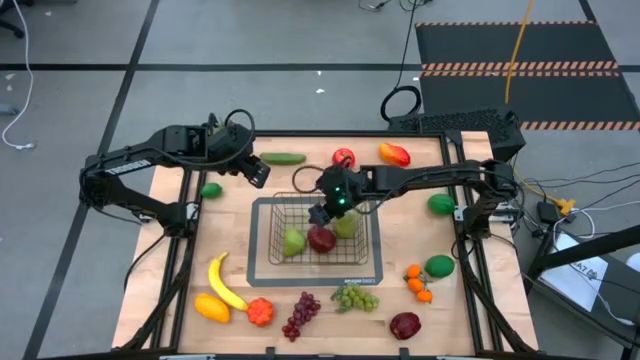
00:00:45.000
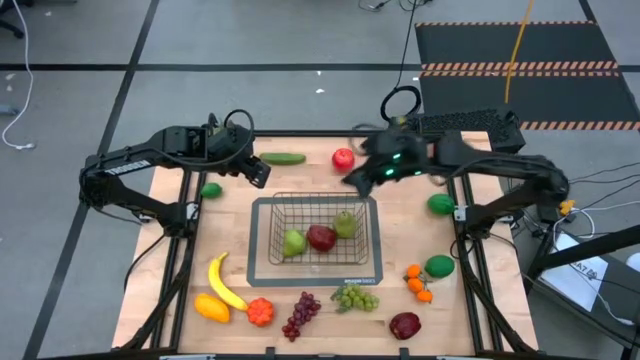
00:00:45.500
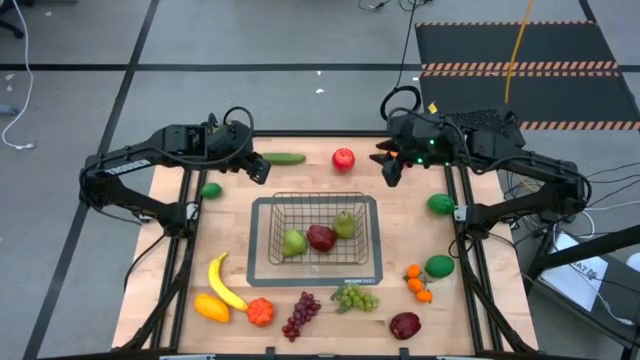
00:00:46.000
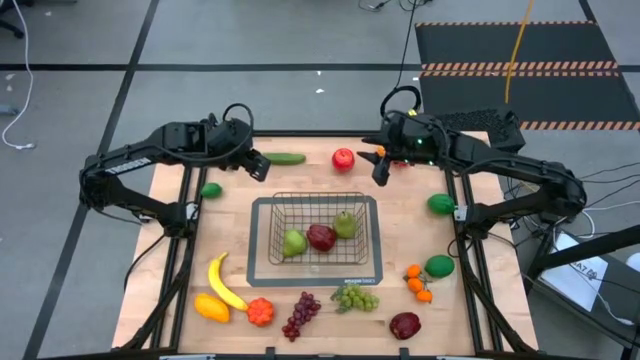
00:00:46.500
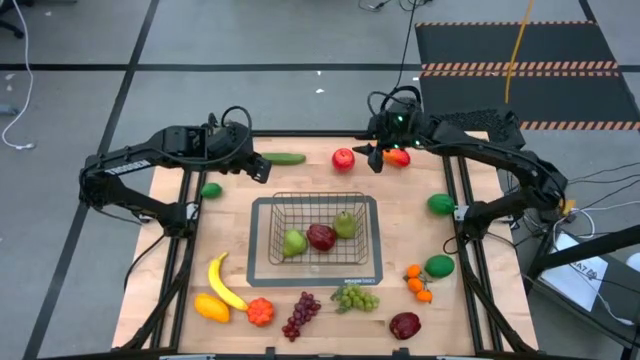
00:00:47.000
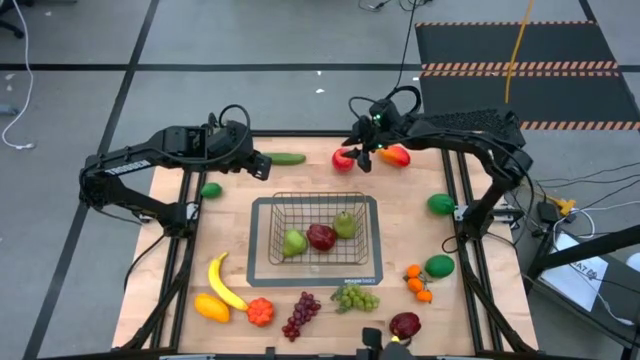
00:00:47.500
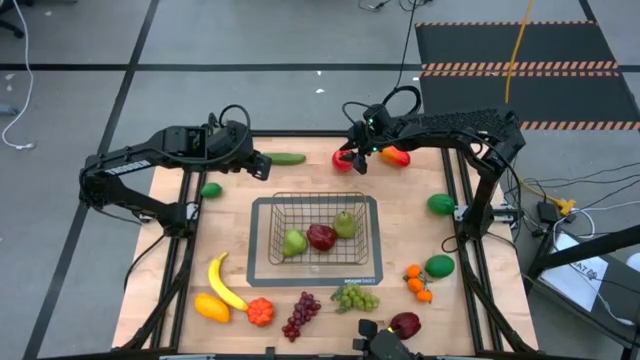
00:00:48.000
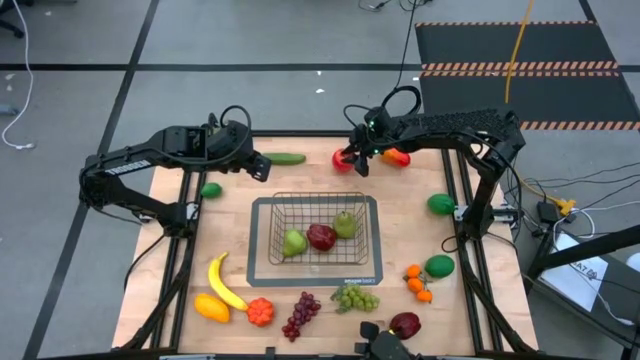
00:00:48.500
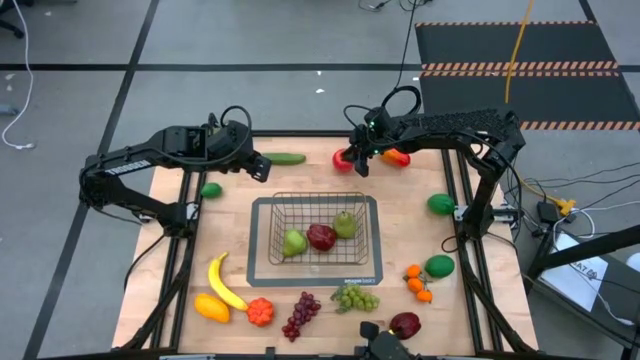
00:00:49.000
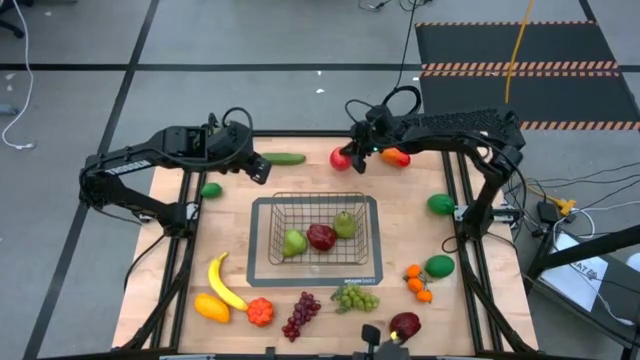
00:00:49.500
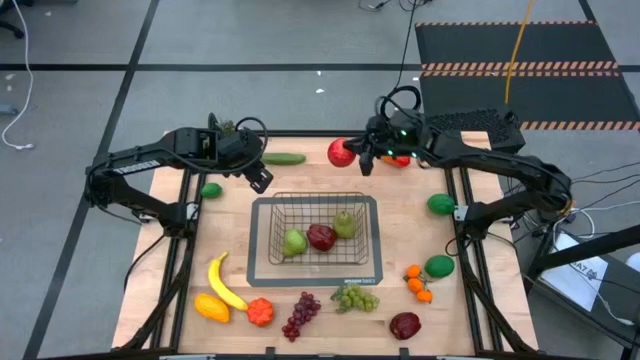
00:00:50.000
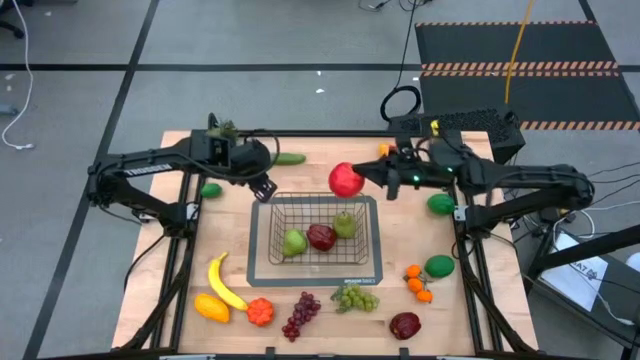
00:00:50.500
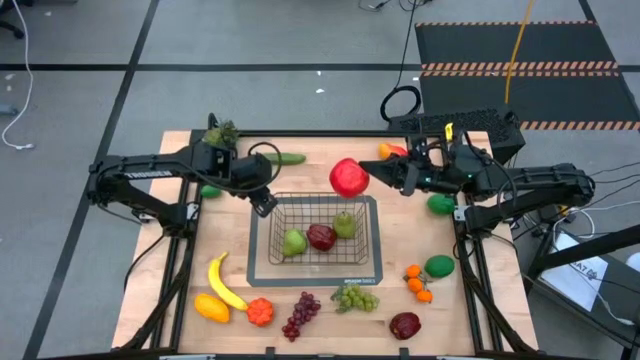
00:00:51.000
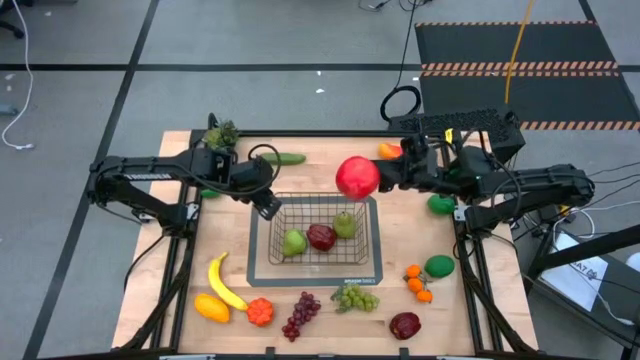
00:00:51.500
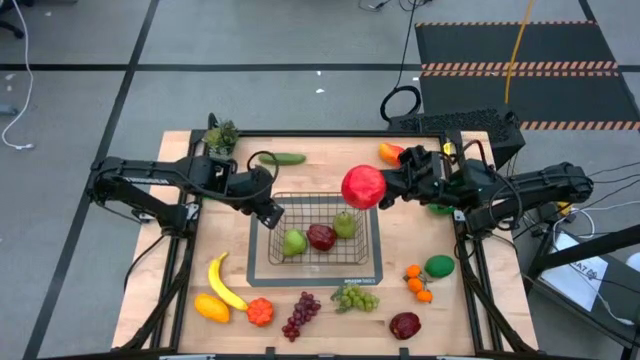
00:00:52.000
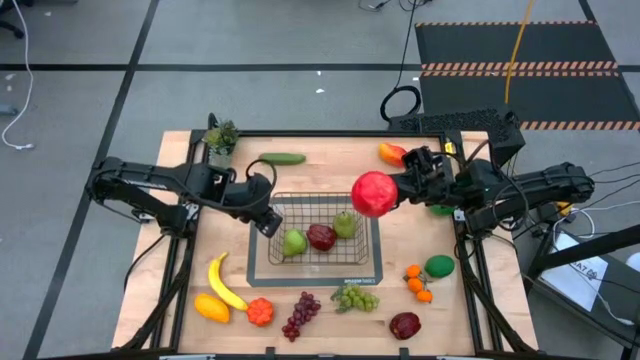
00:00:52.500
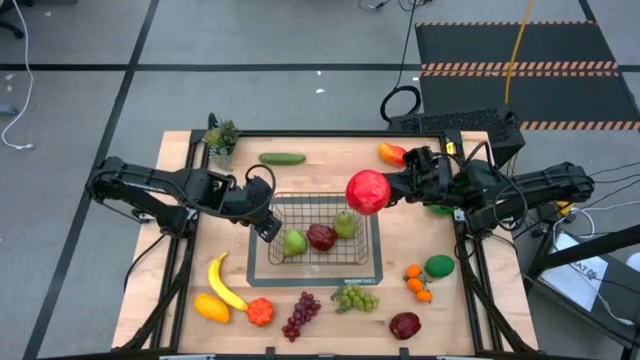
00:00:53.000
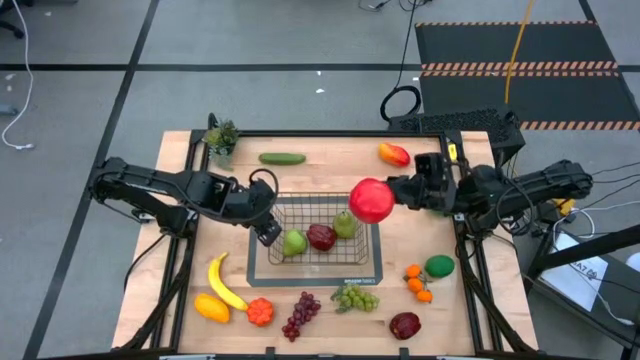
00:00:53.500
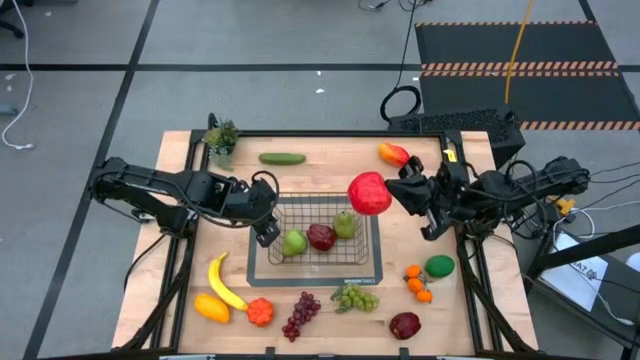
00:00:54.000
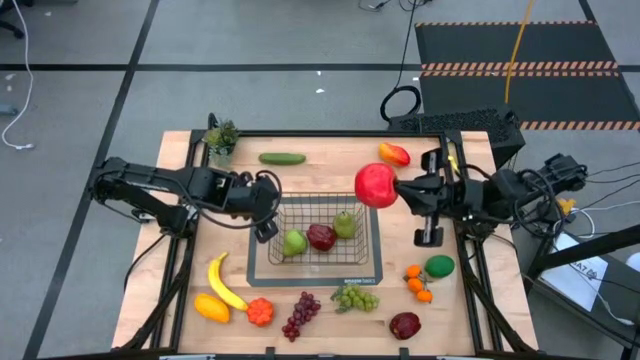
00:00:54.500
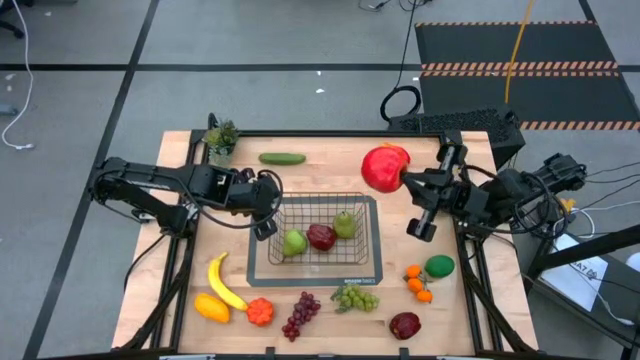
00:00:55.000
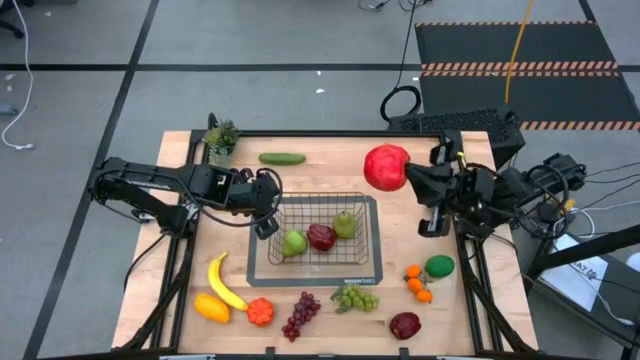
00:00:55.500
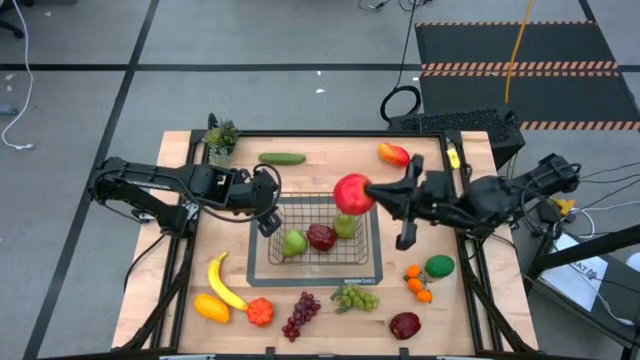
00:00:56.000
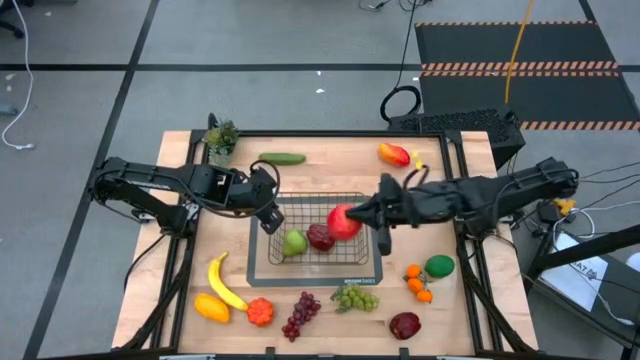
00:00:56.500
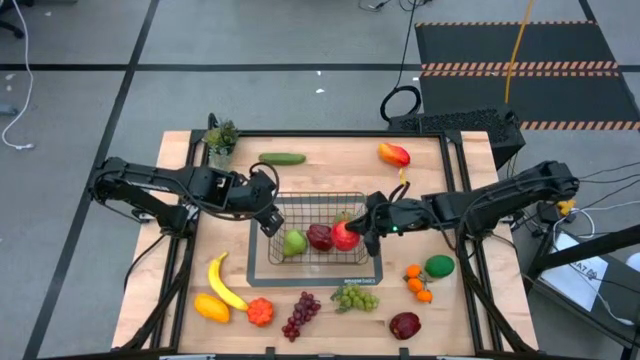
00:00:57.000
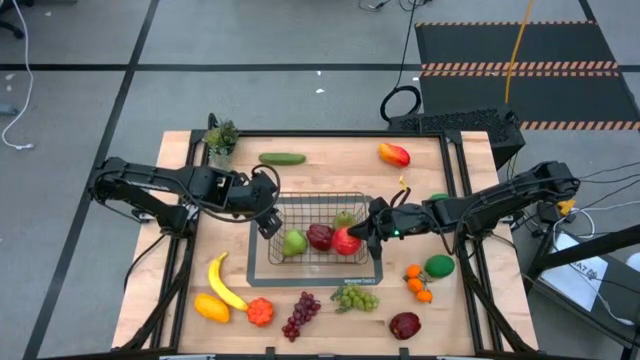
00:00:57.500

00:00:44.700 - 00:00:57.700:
Task: Build produce basket
Put the red apple into the gold wire basket
